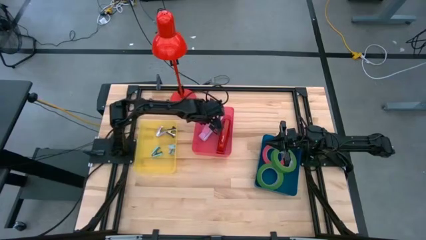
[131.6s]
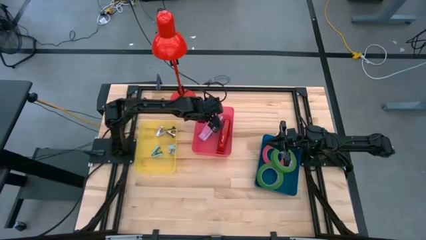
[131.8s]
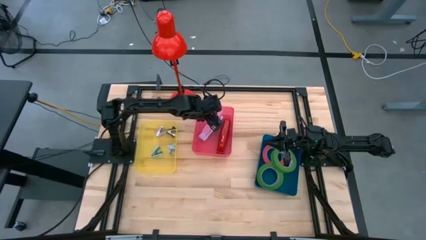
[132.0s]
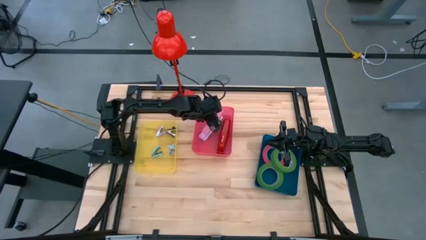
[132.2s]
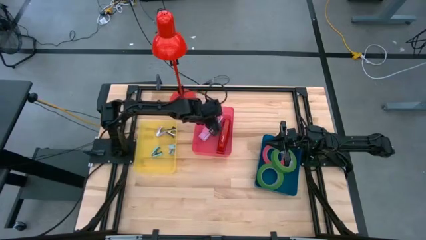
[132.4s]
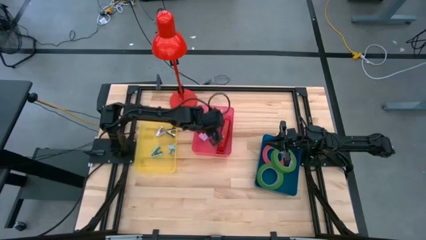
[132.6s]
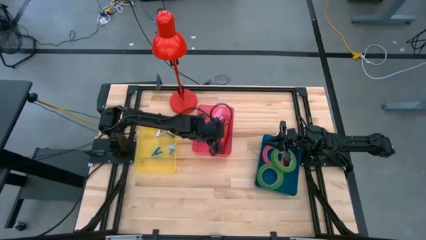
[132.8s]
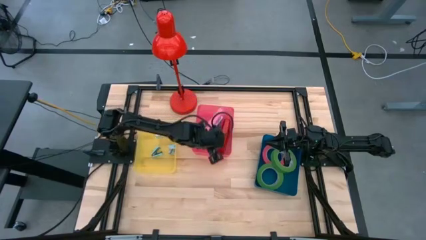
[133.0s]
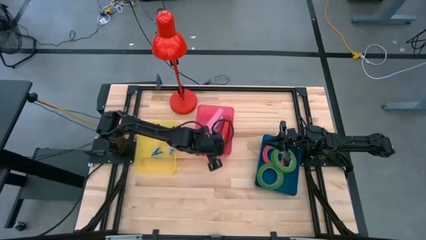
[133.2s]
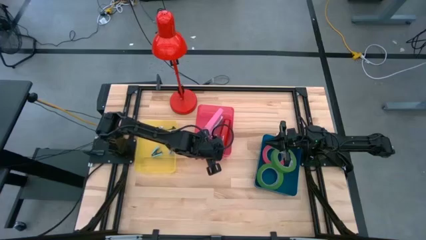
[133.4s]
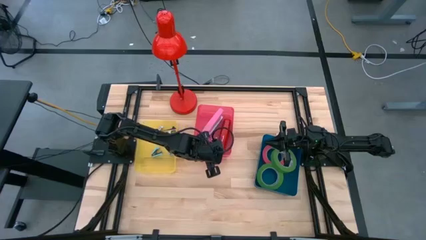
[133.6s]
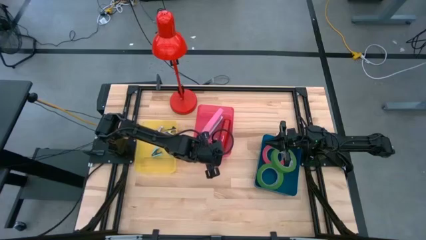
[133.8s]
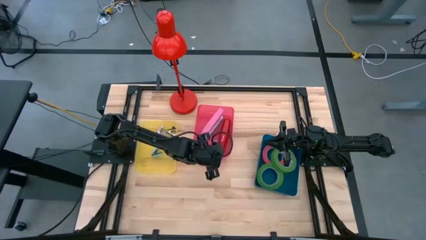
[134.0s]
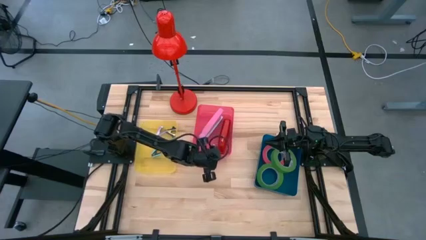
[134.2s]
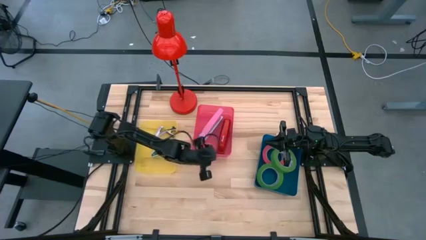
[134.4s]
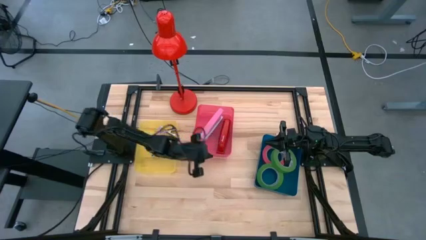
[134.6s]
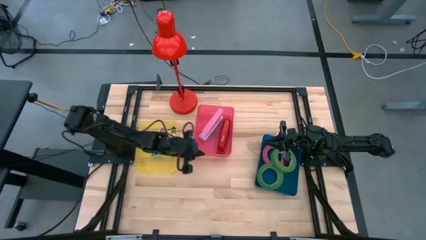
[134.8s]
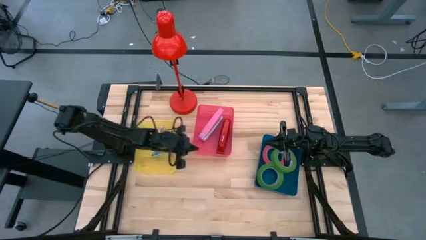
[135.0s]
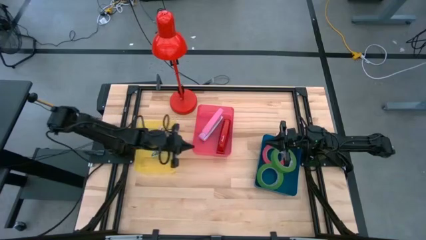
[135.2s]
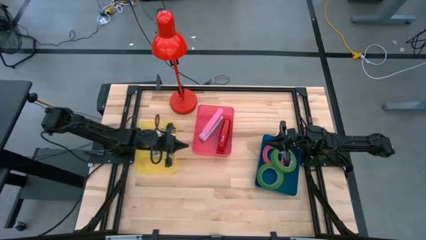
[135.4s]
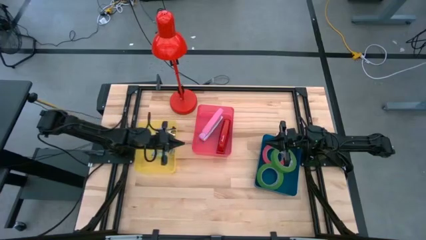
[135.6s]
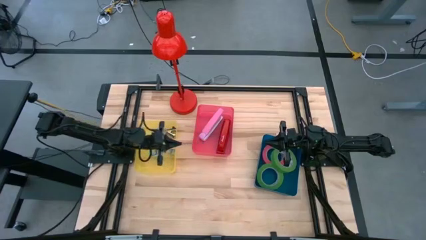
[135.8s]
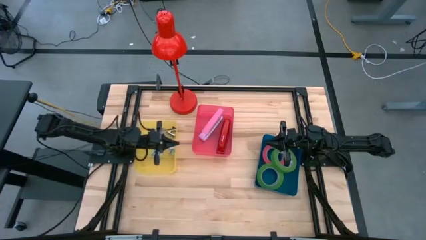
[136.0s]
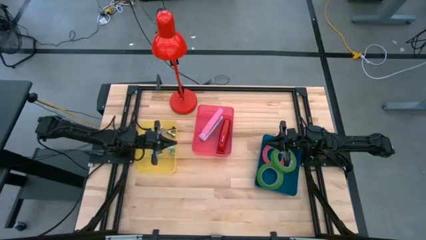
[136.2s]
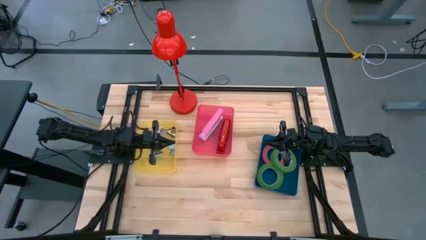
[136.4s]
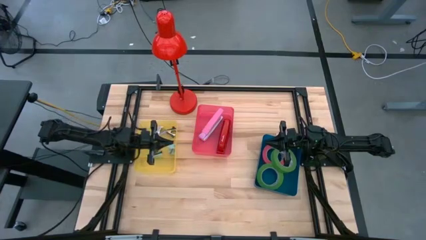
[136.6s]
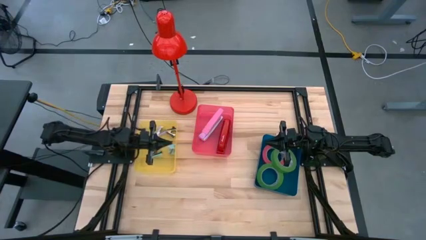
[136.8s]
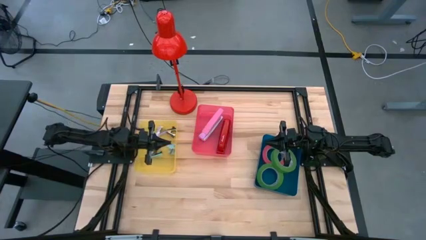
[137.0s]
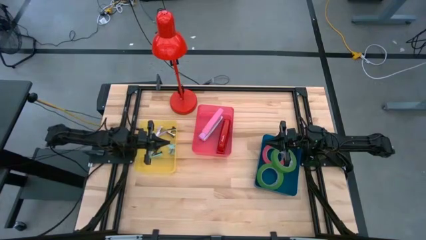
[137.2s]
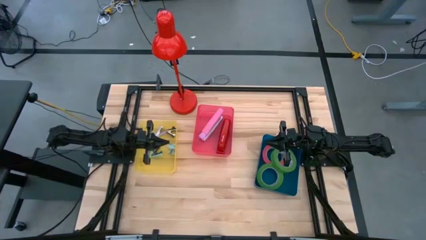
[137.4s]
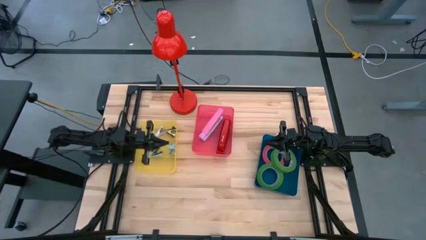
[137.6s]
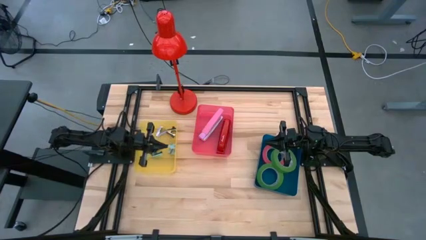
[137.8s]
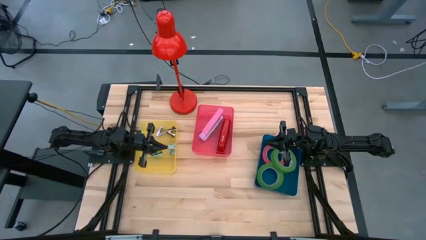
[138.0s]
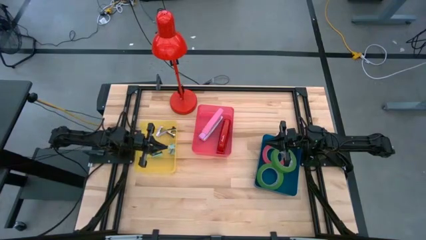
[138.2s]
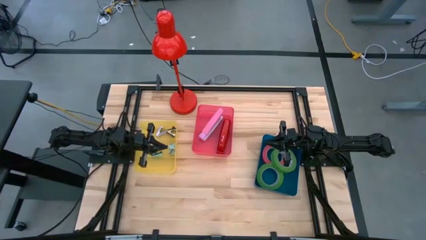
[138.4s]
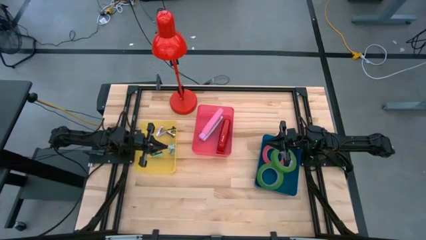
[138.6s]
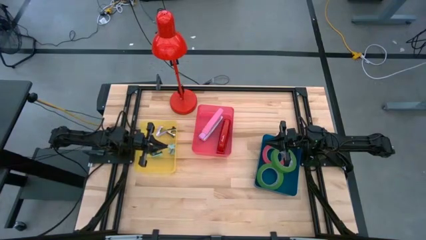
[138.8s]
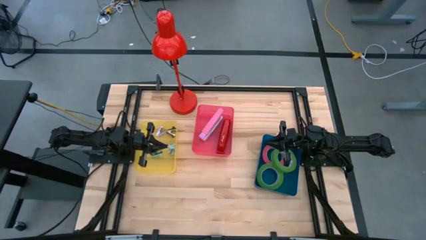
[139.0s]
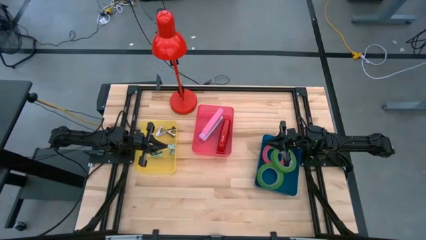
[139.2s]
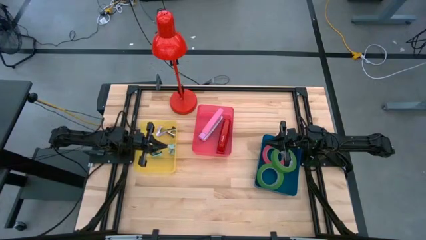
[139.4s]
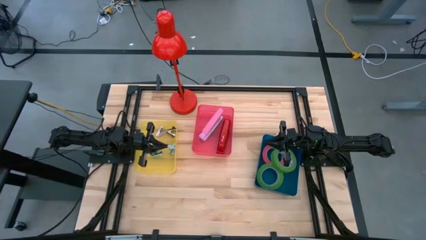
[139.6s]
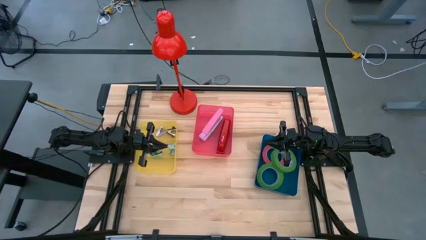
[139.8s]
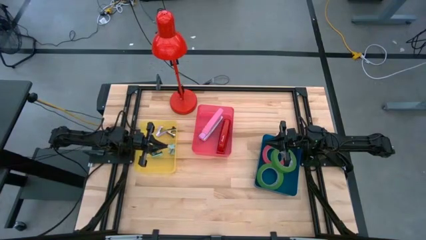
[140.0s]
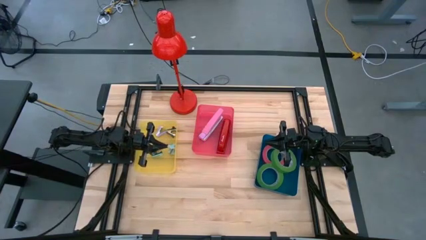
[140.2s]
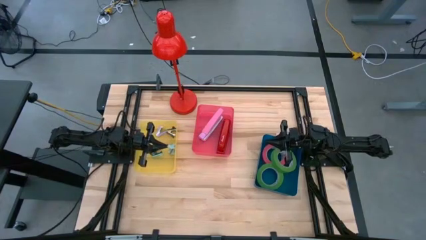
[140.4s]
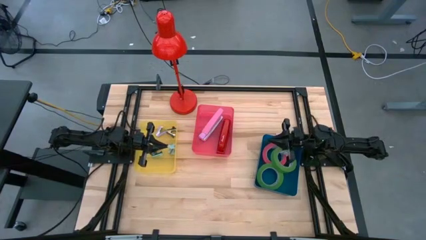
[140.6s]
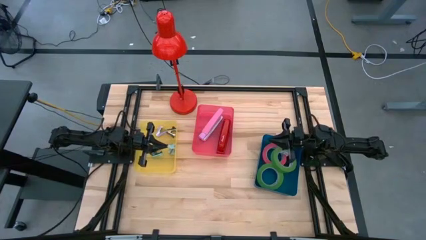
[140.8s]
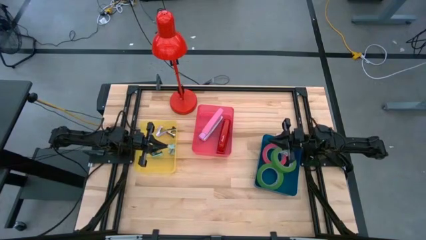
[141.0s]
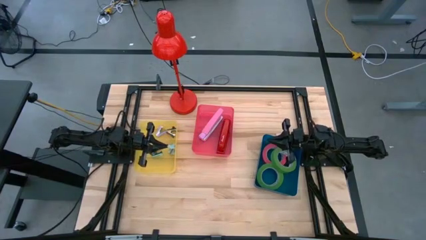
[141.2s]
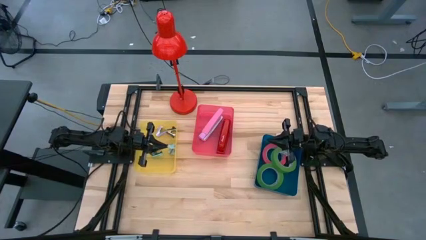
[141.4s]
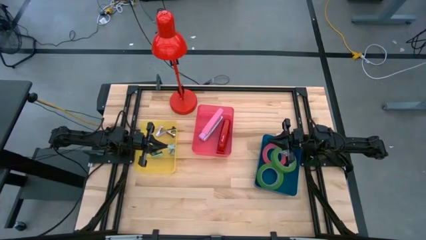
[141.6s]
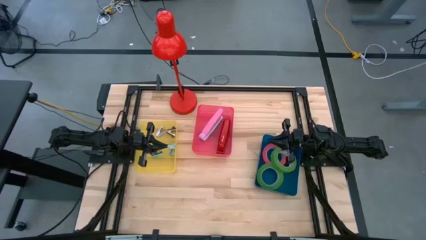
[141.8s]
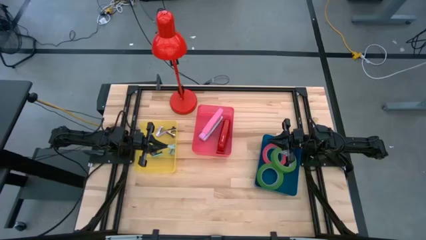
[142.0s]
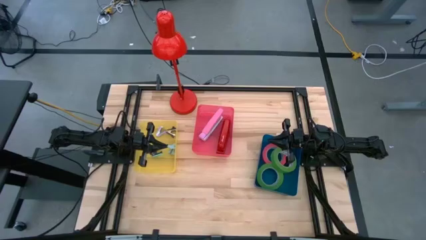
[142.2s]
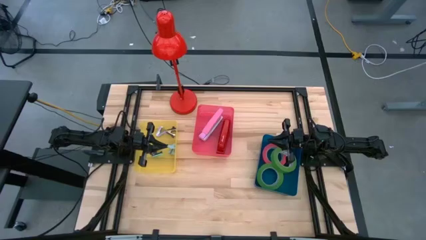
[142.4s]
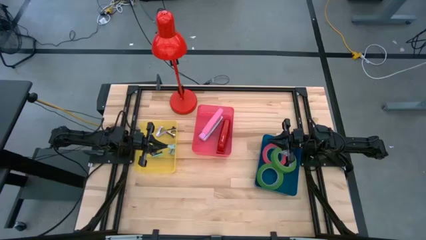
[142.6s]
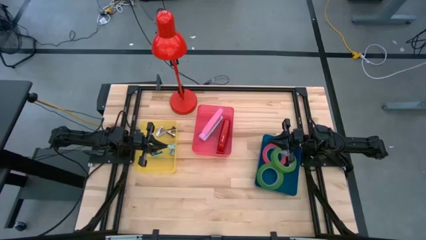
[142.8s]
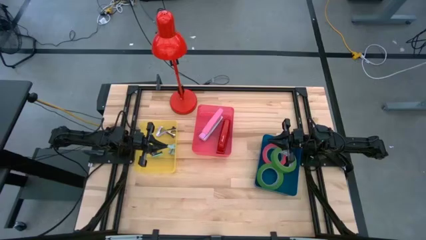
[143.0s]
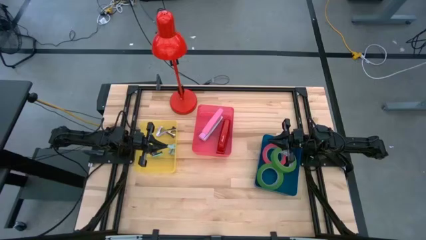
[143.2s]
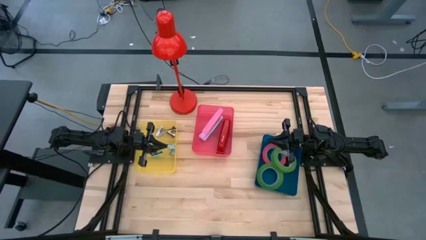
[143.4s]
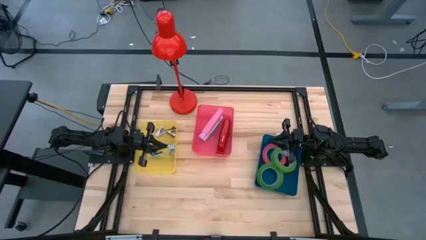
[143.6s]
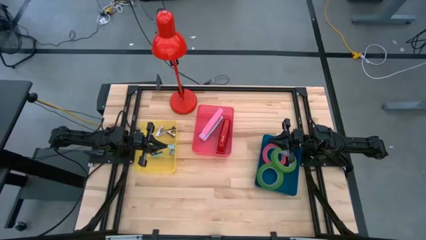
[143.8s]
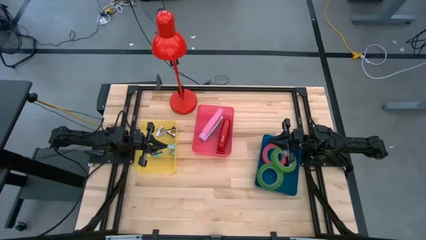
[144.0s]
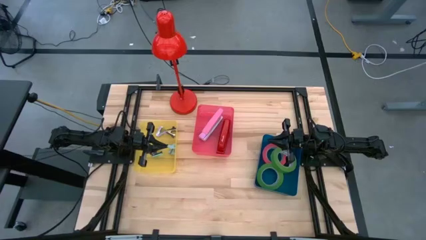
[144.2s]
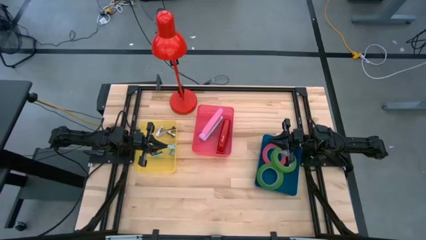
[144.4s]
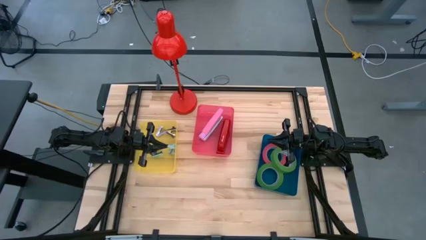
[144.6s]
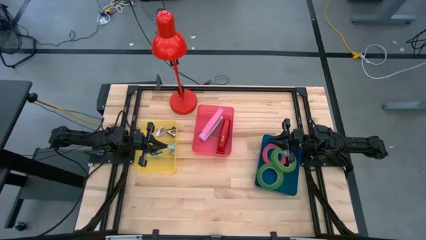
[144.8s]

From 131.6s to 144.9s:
Task: Pick and place Stapler, Stapler remover, tape
Return to Home Position

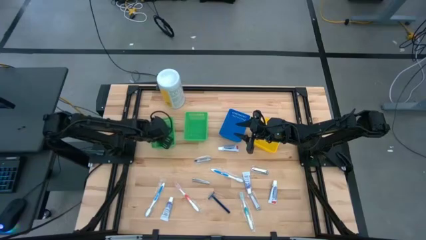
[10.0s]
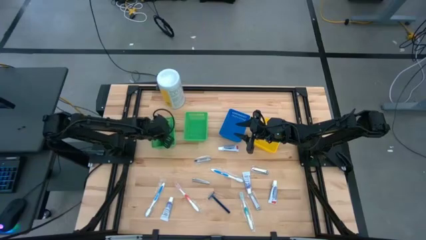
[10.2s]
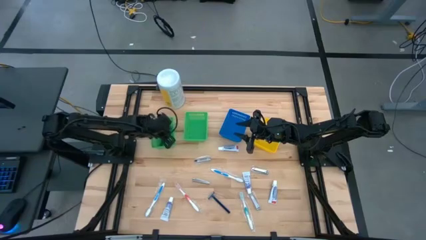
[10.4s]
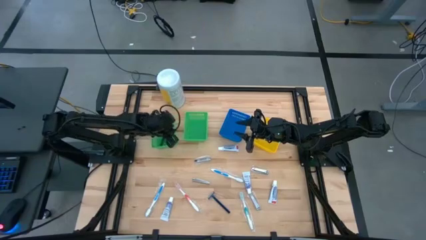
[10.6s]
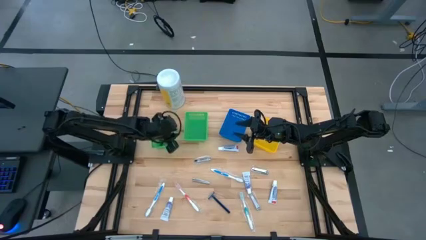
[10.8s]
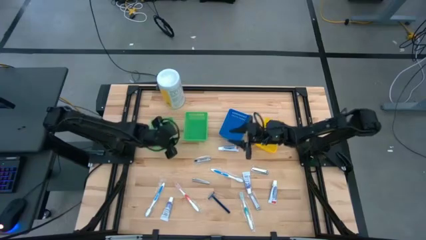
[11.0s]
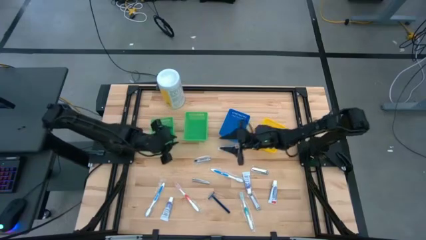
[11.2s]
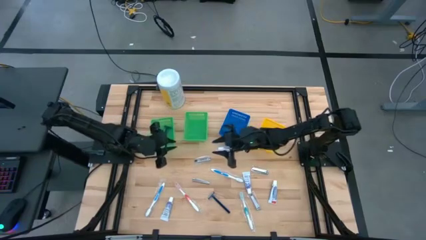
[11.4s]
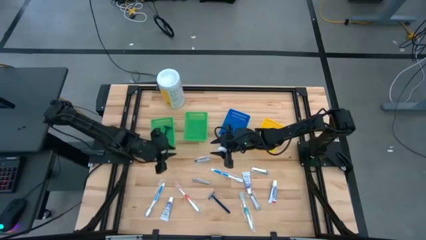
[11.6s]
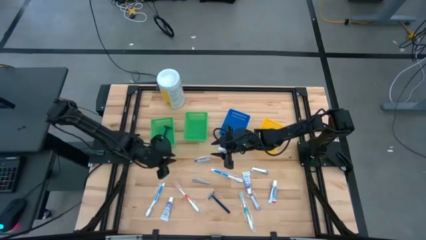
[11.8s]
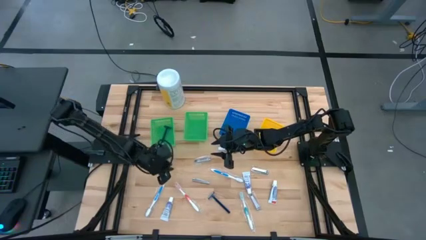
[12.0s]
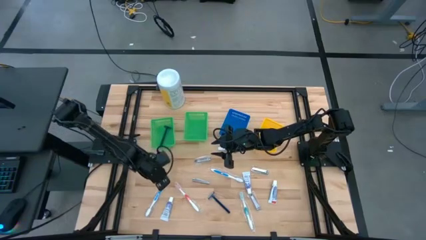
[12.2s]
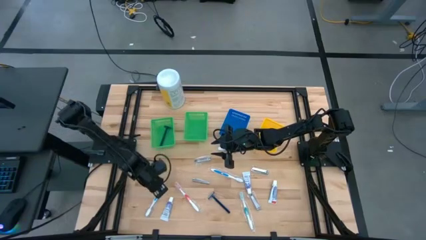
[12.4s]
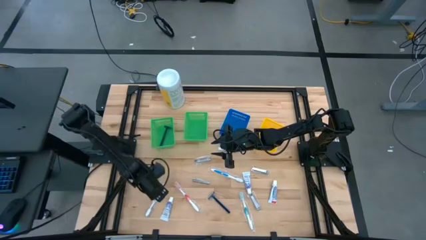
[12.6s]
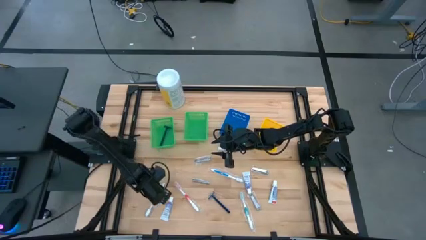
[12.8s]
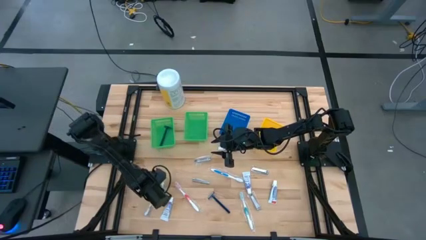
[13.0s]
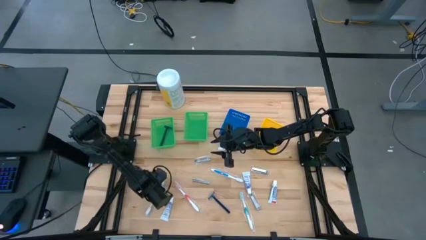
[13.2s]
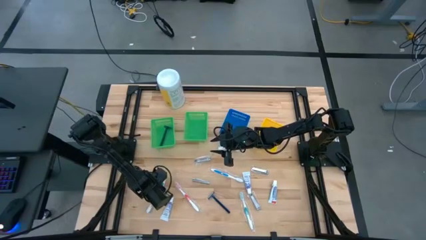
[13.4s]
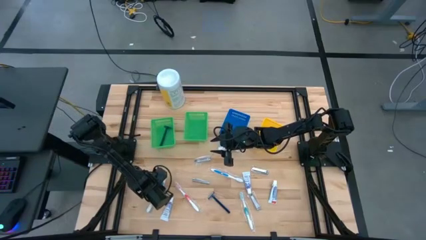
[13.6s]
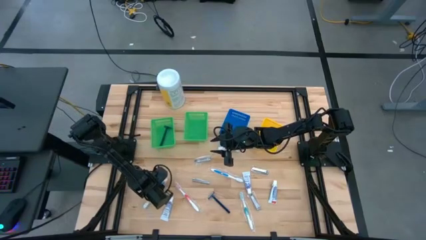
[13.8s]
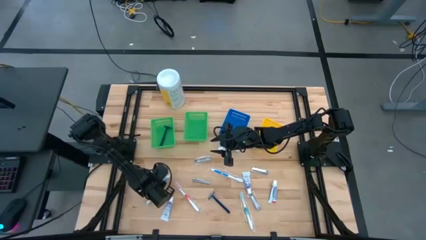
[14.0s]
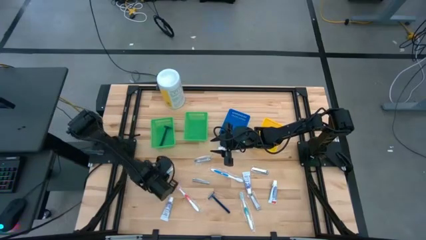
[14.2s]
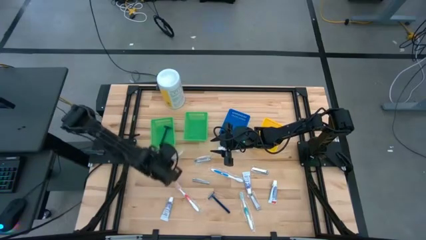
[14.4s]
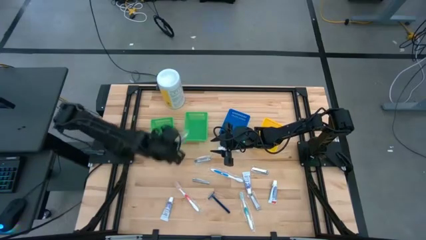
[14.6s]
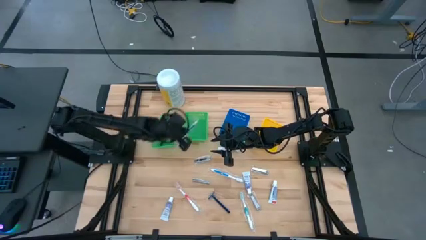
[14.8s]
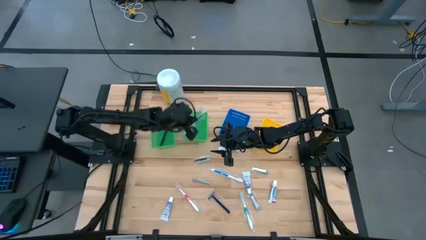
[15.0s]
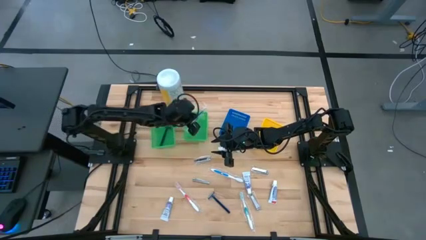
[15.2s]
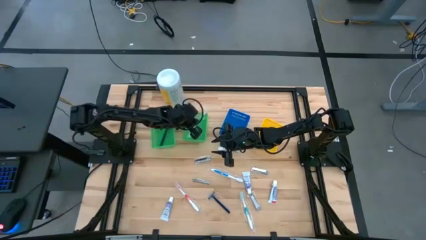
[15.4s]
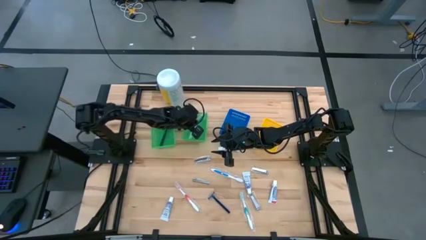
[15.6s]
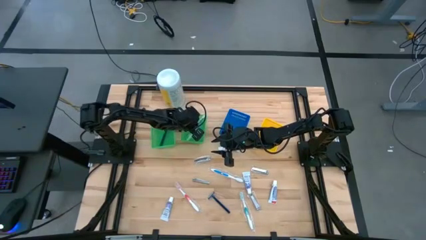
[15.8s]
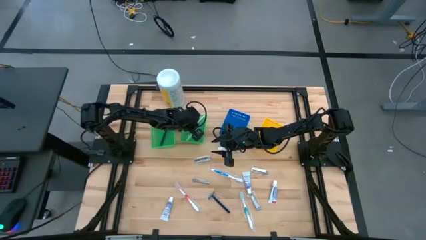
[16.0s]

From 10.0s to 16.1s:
Task: Pick & Place Travel size toiletries
Put the left blue toothbrush into the right green bin
